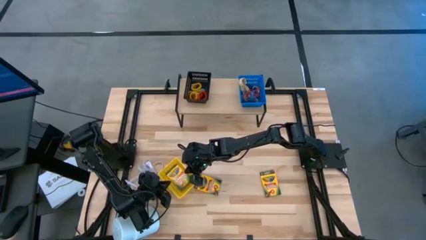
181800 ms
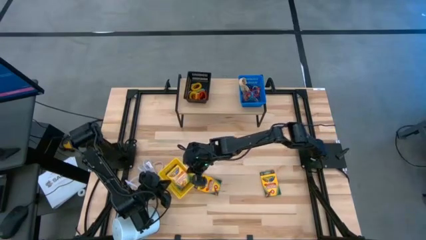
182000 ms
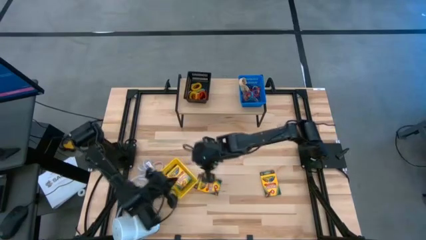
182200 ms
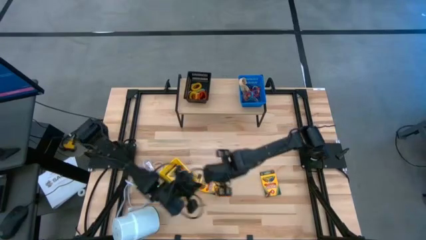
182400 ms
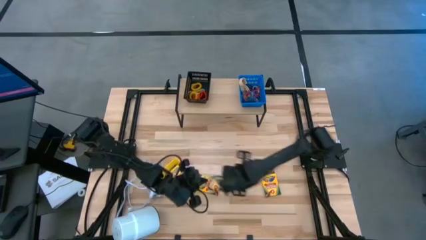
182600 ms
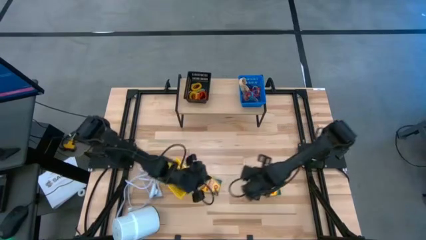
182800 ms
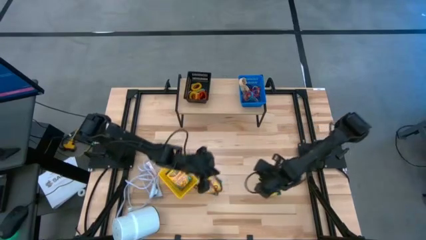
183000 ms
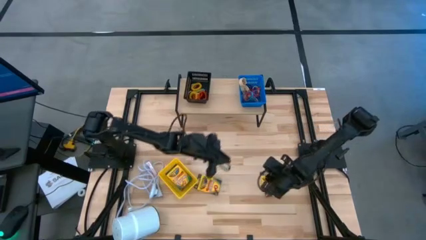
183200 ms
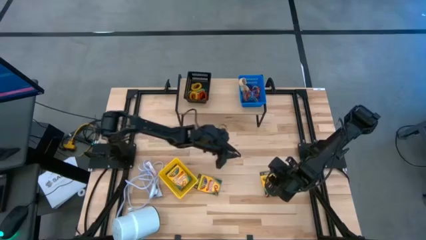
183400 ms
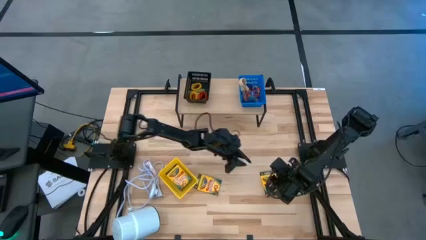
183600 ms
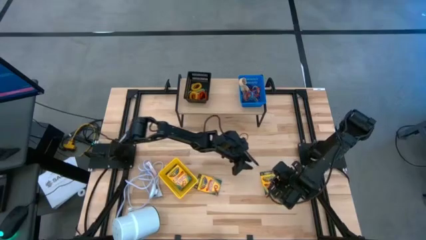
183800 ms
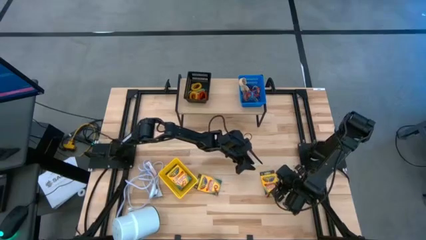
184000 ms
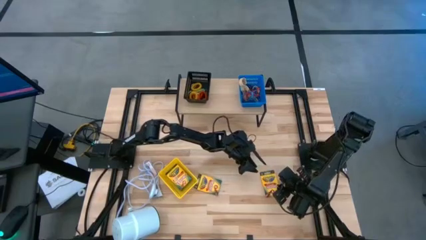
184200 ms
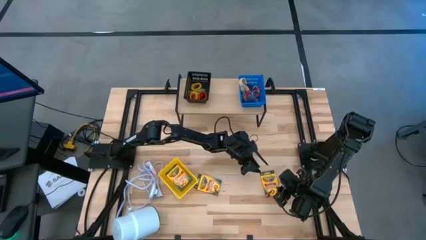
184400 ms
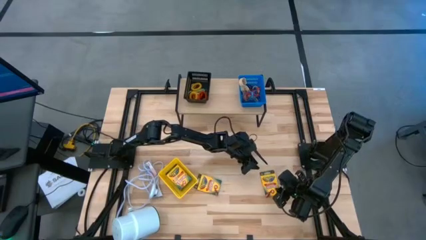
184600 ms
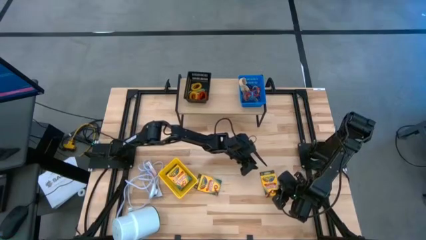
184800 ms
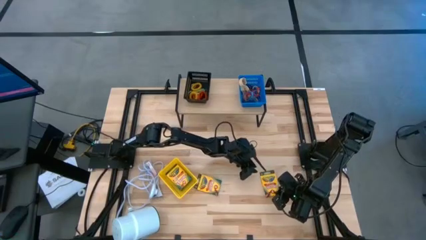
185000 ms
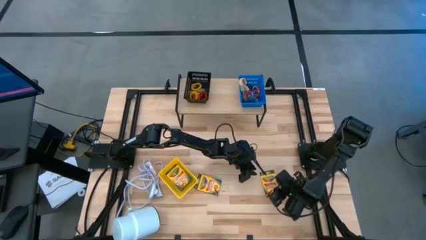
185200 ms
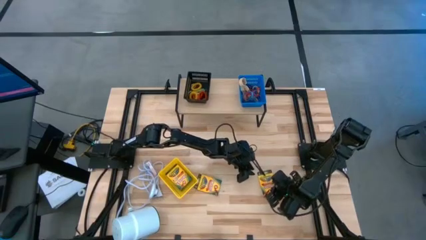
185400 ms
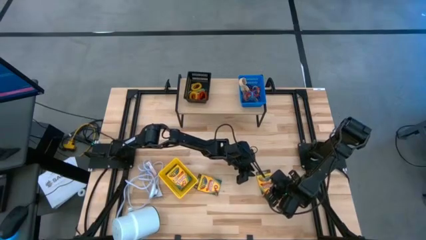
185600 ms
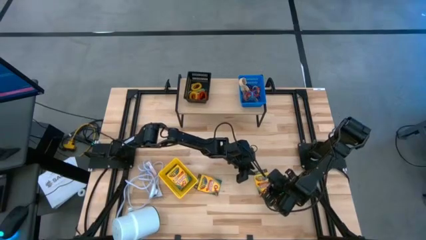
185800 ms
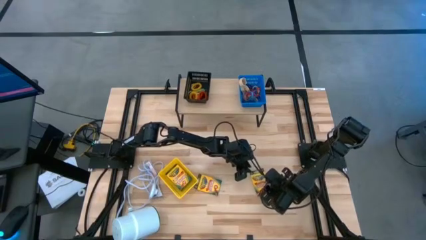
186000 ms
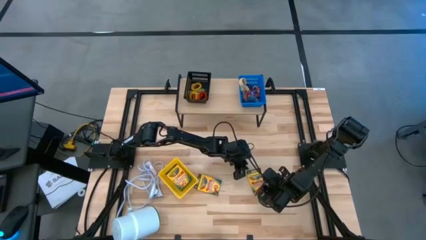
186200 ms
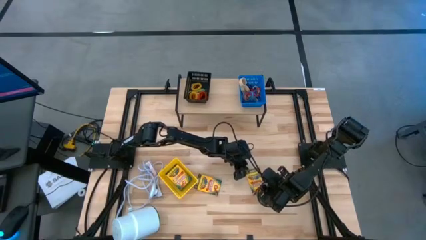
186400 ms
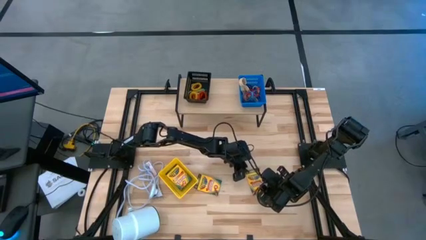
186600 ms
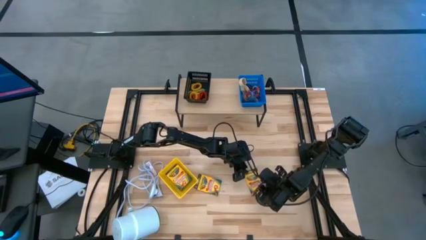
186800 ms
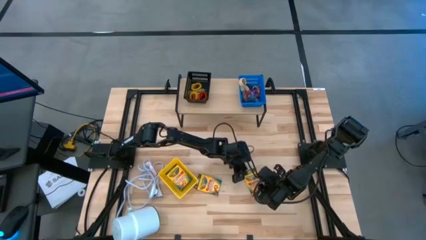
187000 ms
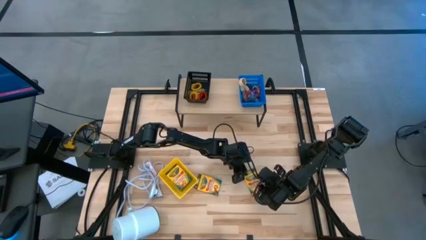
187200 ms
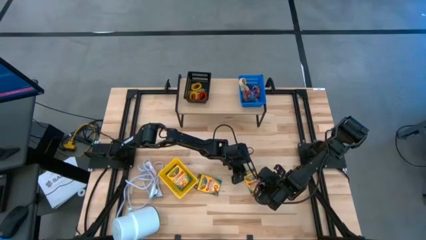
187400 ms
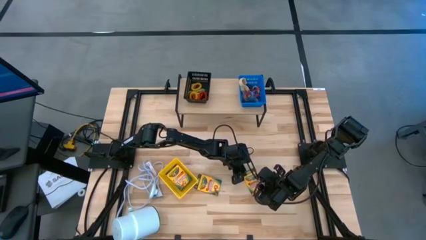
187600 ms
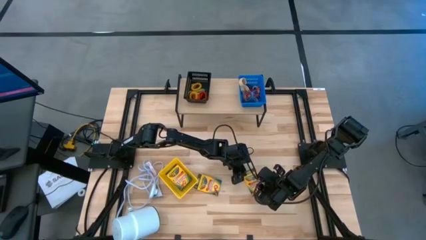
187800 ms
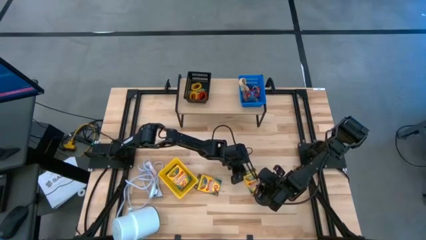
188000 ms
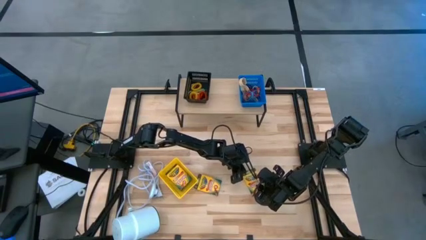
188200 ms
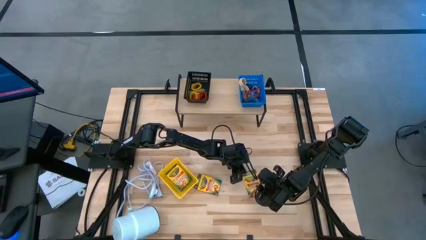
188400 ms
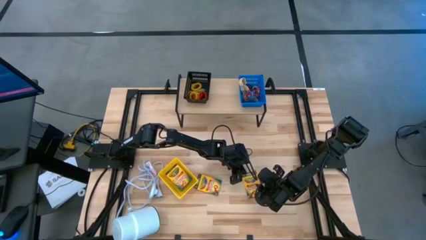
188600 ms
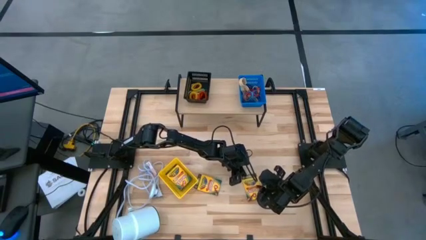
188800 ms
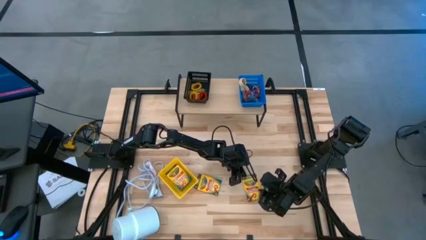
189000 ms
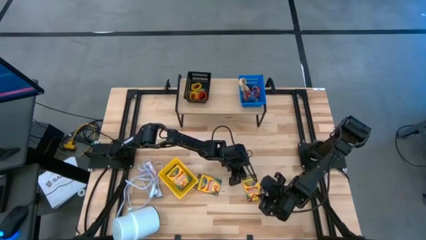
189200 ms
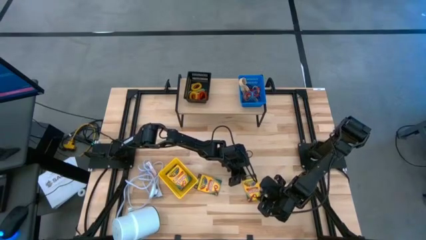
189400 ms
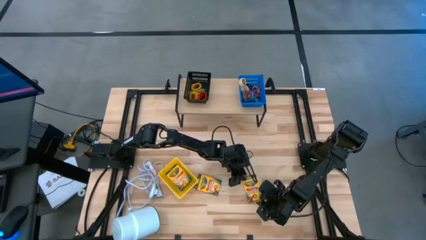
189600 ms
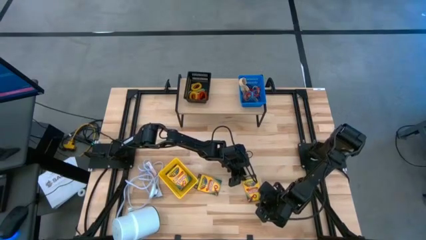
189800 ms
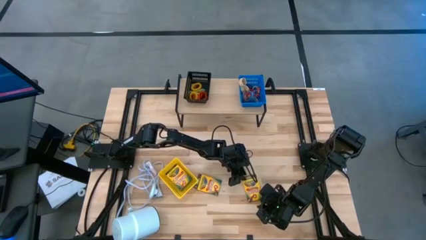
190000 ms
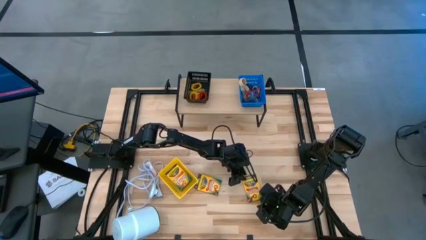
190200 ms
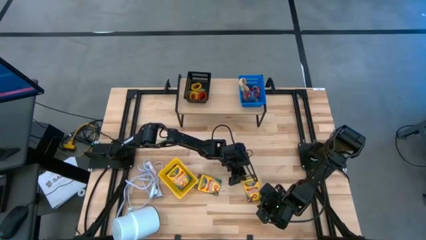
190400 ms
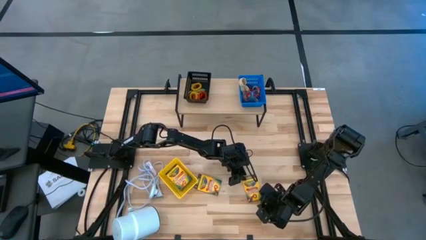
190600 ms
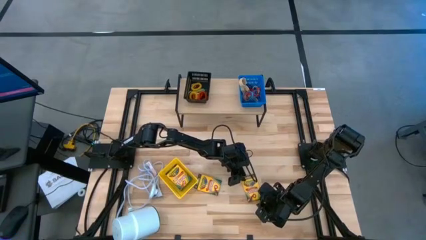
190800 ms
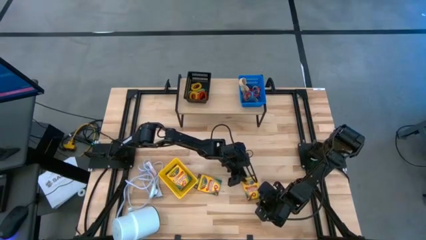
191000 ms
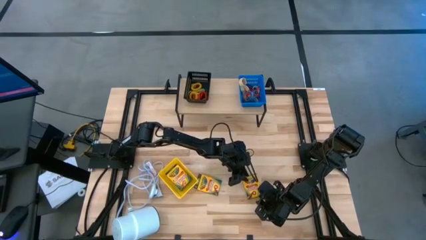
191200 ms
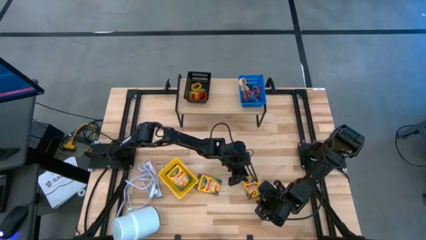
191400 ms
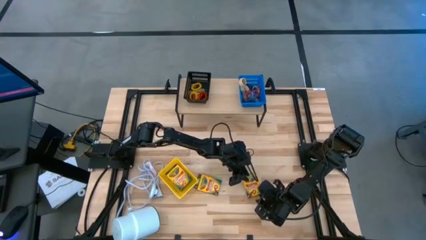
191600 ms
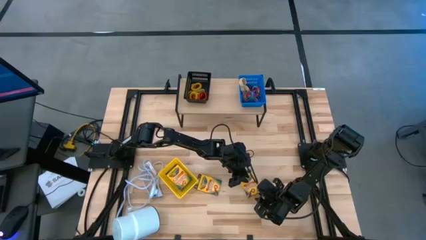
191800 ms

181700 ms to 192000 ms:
Task: Pick & Place Office Desk Supplies
Put the yellow crayon box into the yellow bin

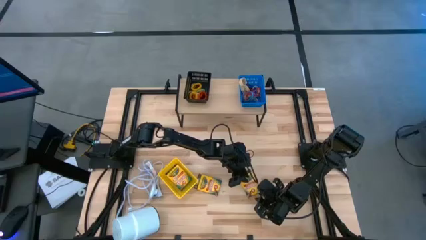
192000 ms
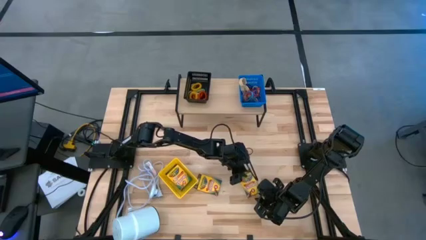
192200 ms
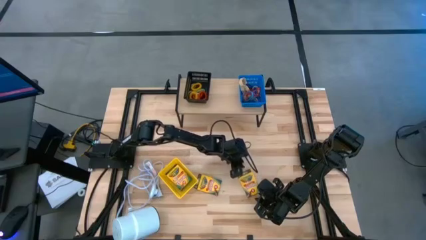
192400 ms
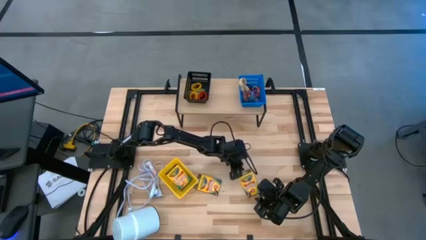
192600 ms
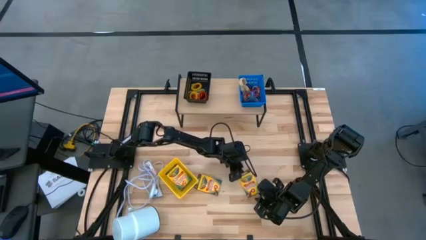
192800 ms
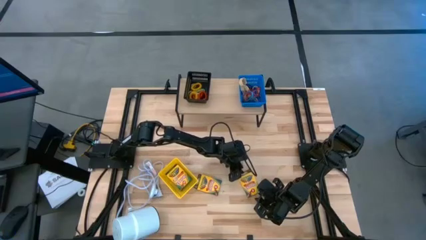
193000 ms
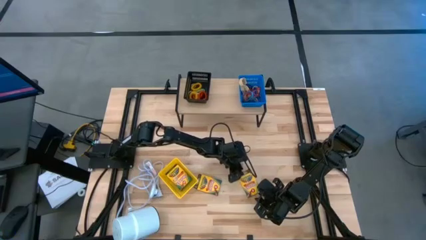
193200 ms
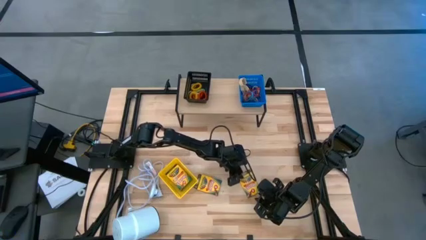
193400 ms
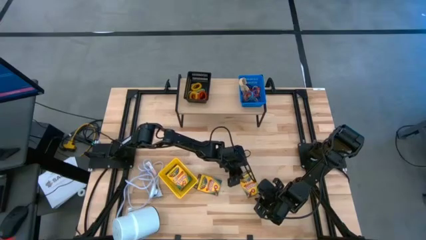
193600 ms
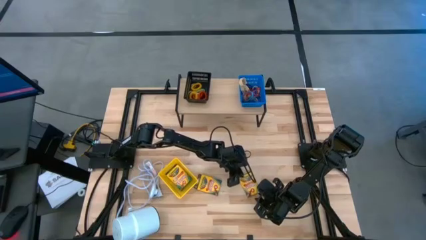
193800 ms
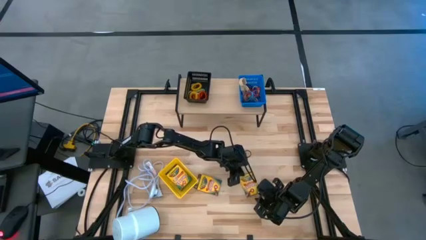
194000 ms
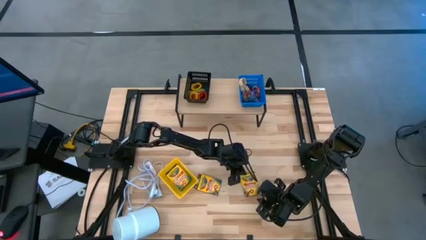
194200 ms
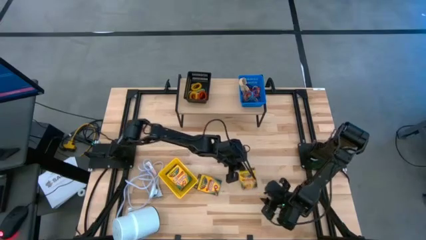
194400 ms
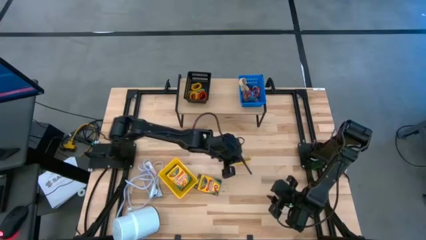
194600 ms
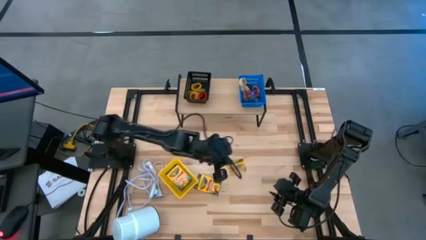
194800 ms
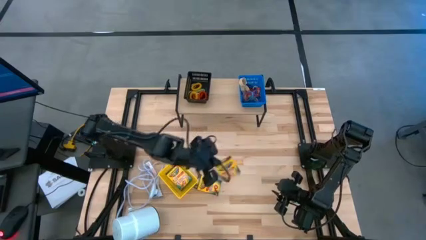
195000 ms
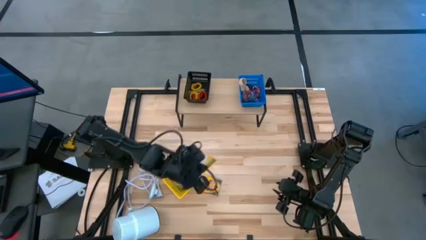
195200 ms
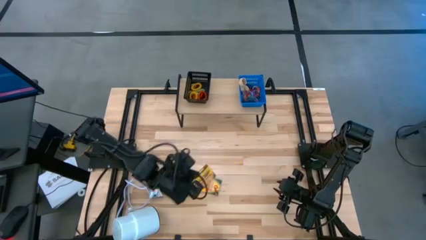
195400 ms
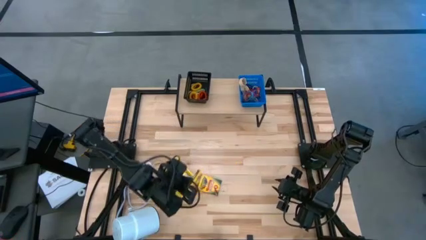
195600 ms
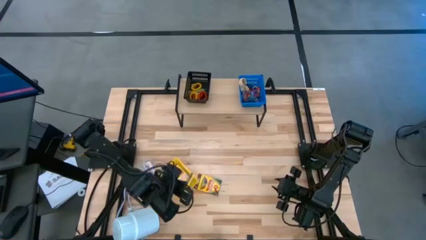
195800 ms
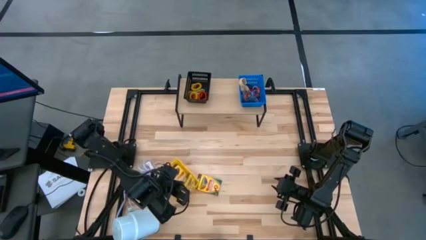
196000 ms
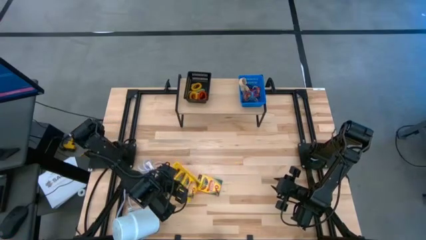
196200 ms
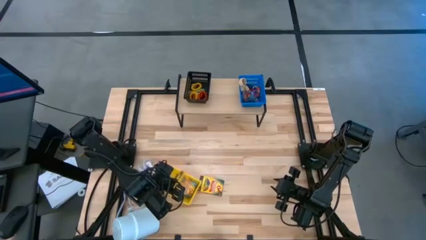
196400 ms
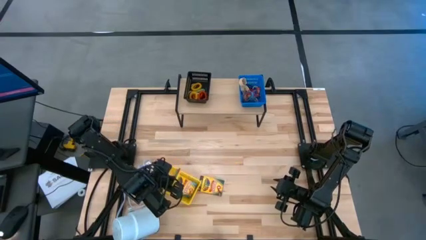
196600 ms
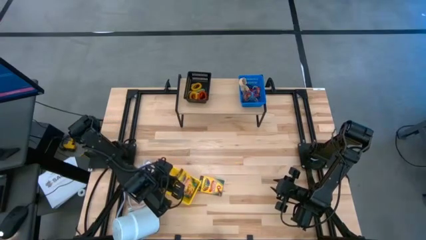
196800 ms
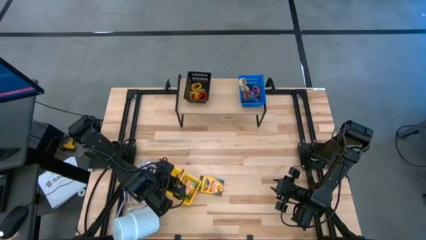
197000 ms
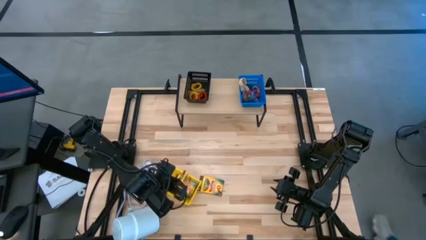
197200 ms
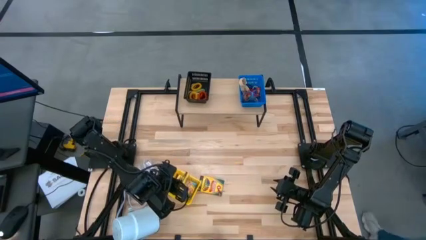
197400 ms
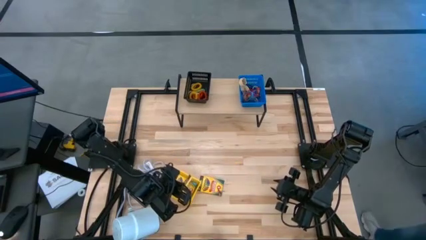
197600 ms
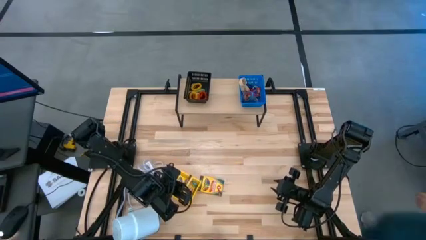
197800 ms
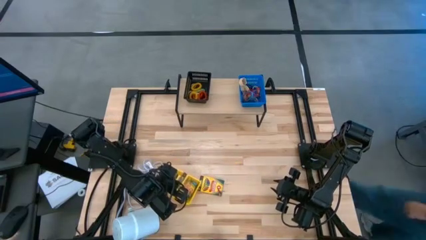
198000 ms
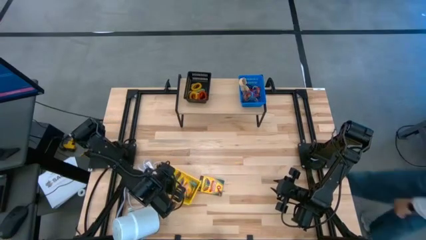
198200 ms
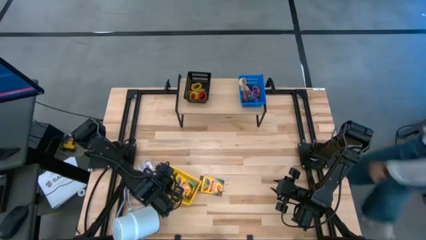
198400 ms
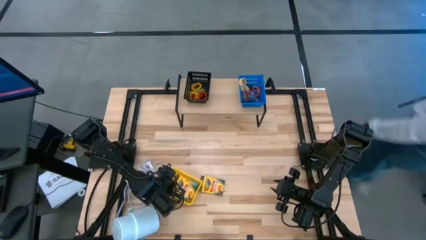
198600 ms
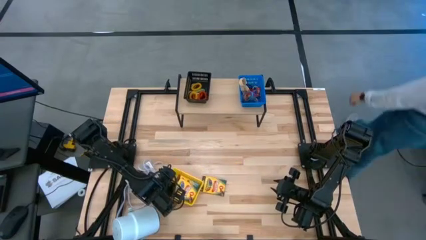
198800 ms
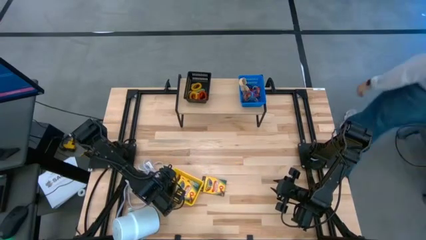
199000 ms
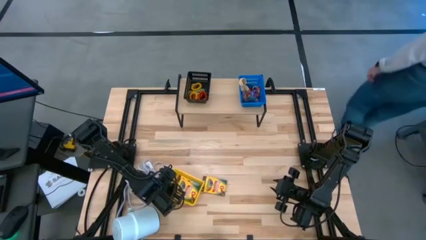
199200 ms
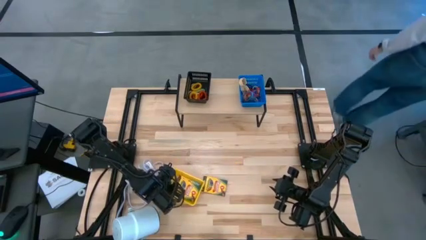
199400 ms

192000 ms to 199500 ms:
Put the yellow crayon box into the yellow bin
